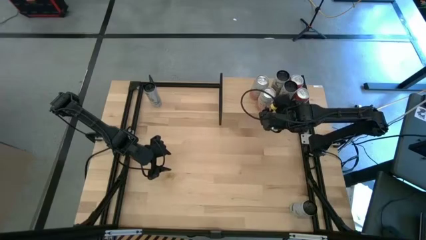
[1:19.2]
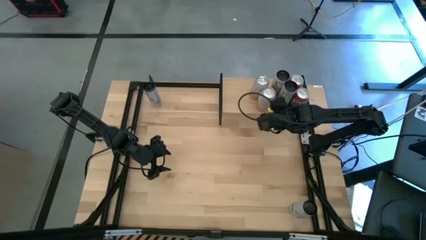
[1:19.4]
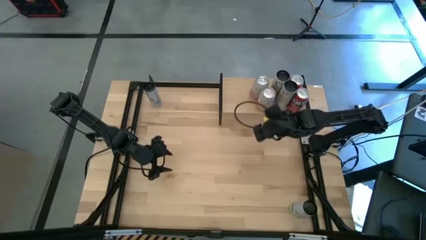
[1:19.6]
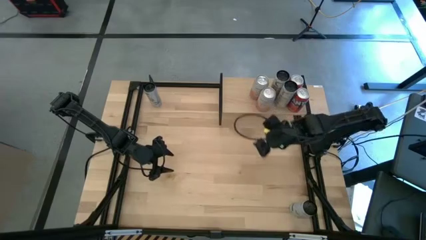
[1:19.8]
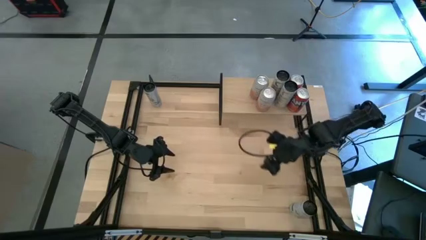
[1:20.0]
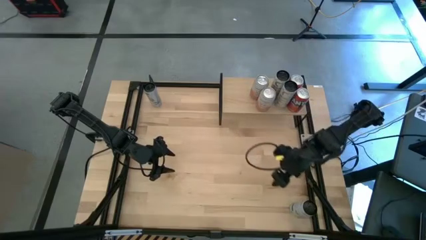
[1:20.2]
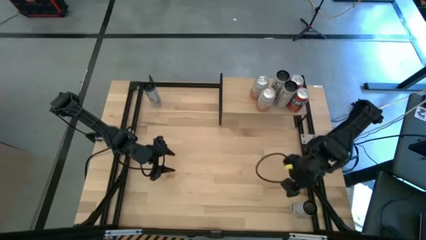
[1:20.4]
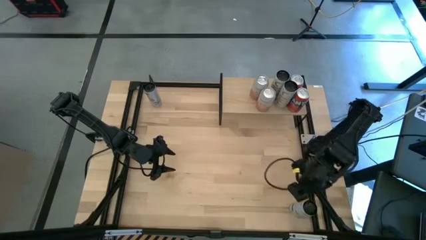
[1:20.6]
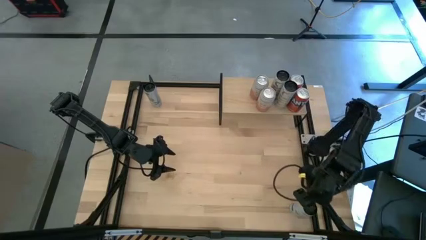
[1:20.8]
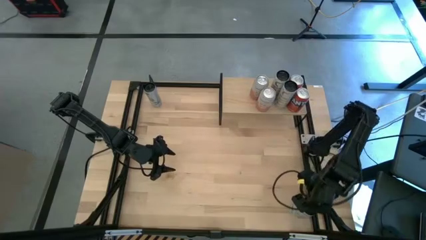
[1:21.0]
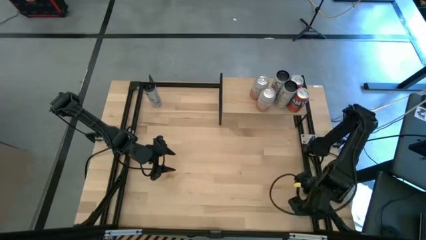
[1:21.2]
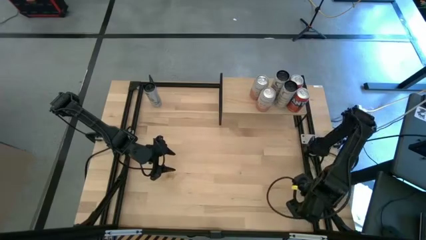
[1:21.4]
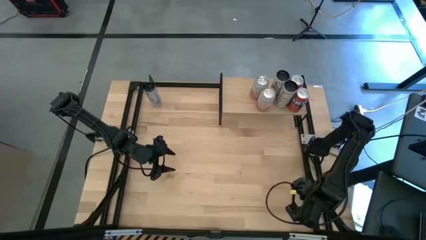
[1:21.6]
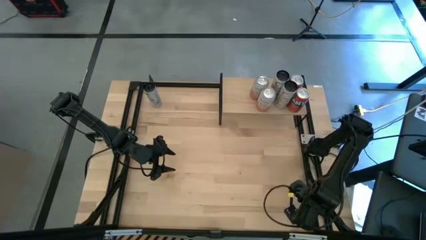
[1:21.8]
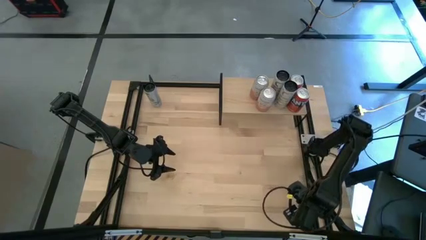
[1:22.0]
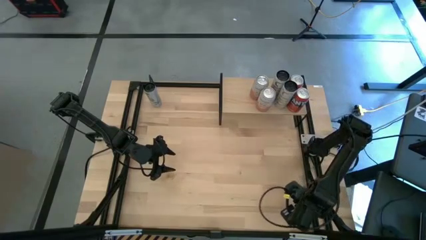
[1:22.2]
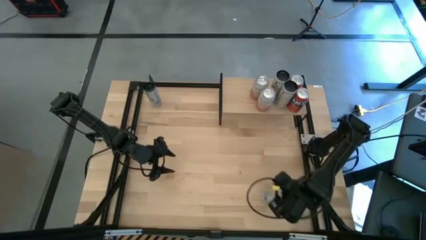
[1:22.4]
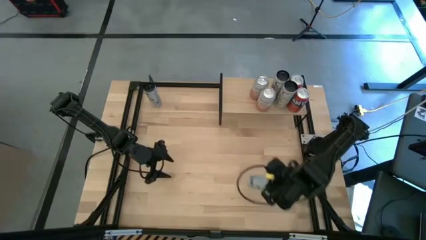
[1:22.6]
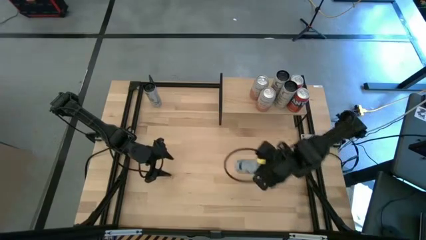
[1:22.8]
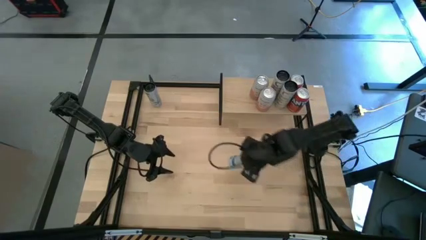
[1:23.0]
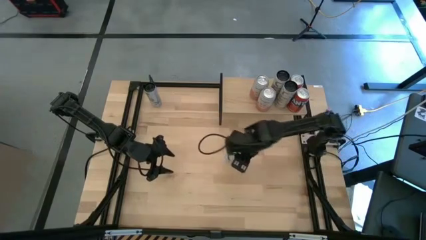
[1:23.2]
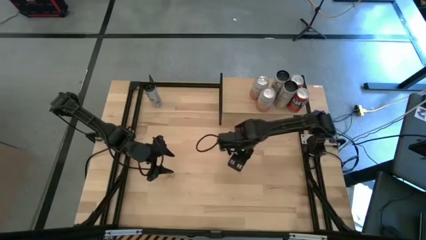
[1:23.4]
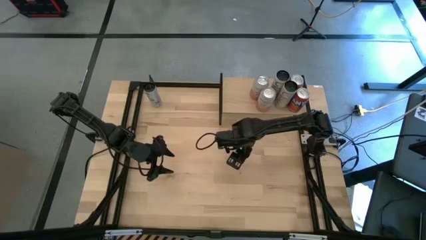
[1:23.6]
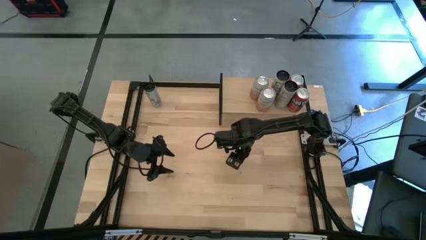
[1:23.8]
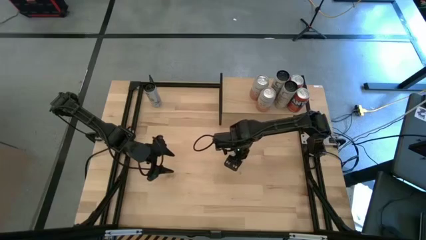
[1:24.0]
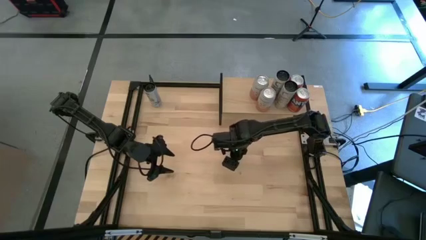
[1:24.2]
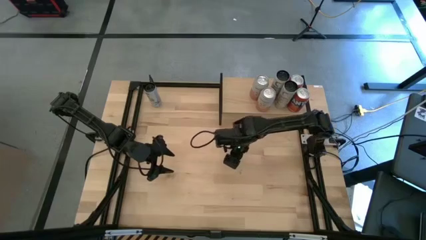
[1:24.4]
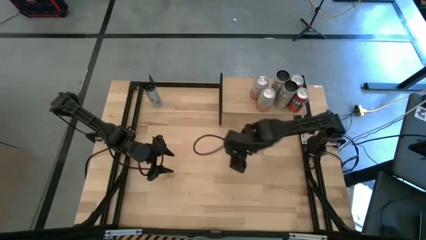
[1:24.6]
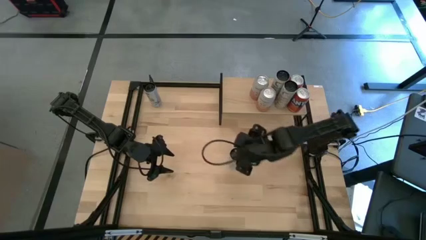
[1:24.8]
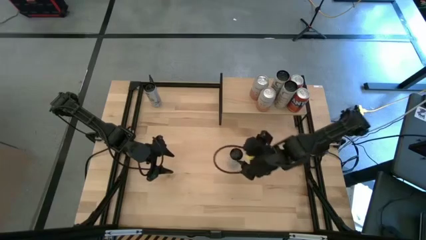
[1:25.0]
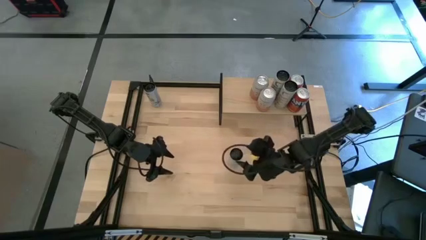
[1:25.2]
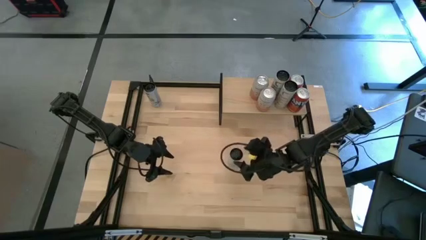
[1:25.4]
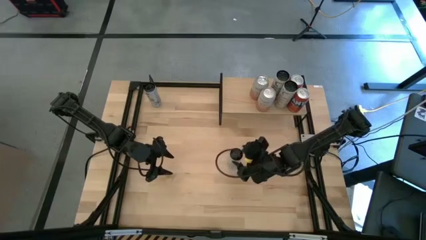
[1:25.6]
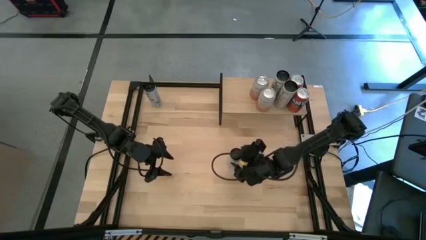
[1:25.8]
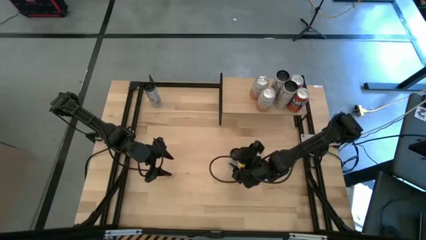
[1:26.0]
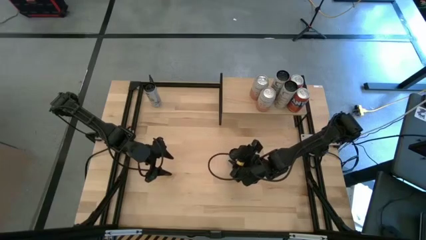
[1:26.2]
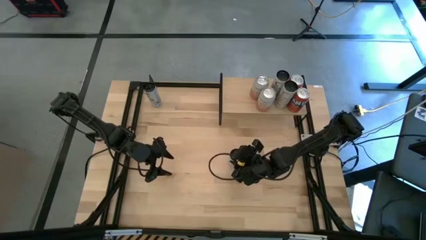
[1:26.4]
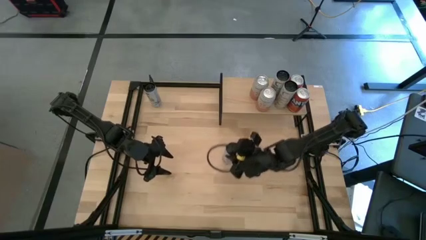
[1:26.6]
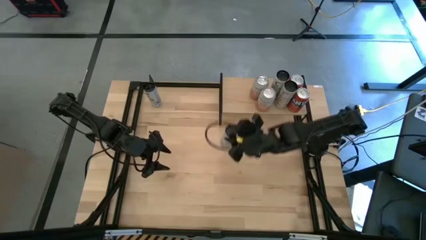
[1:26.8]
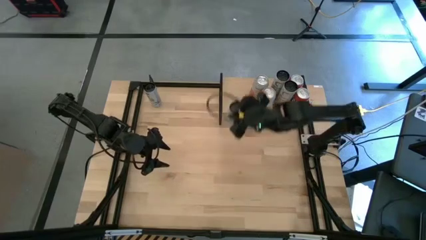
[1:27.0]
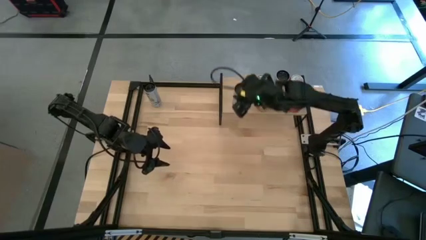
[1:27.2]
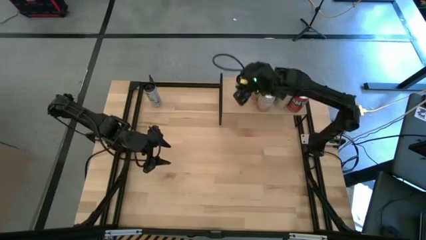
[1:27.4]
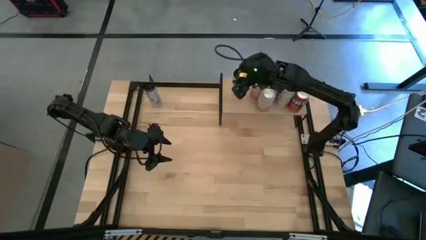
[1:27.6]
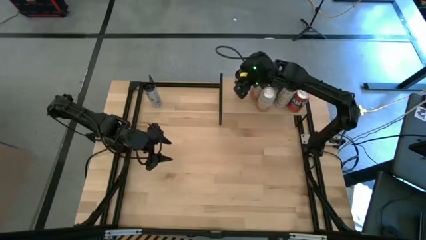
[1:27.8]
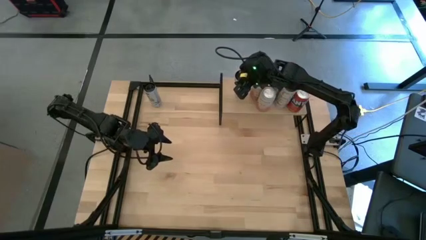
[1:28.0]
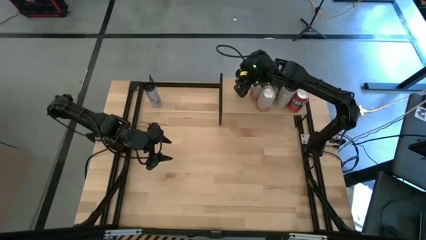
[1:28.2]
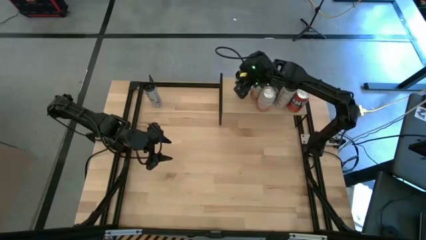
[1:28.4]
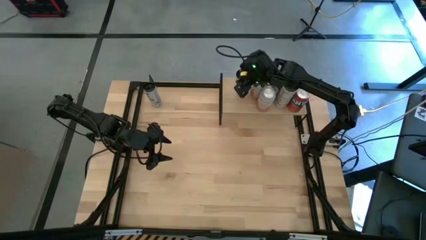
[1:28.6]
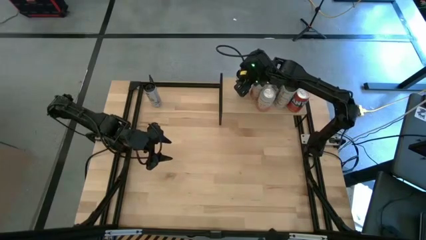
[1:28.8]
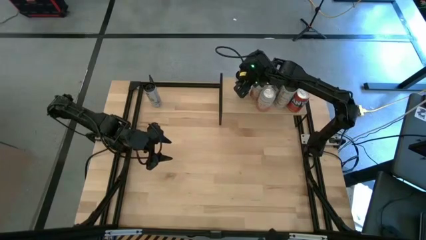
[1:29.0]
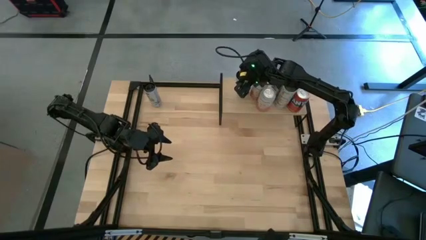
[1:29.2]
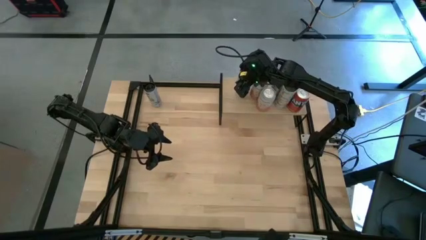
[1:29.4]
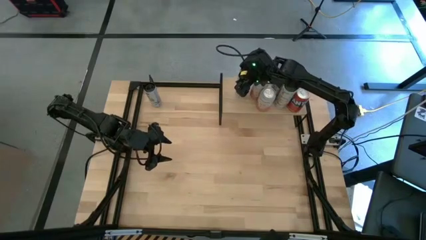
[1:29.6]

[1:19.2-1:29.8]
Task: Place canned beverage on shelf
Put the bottom white blue soda can on the shelf
